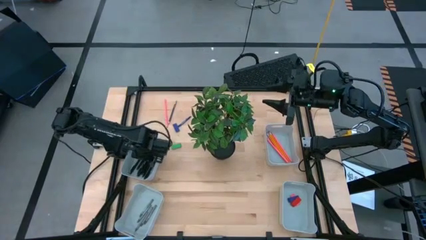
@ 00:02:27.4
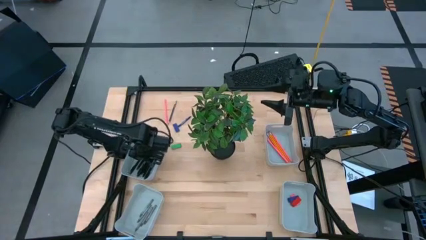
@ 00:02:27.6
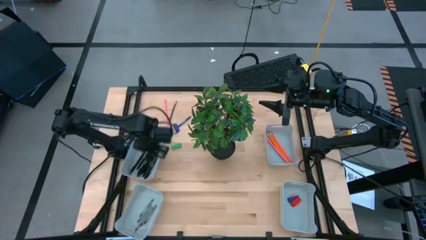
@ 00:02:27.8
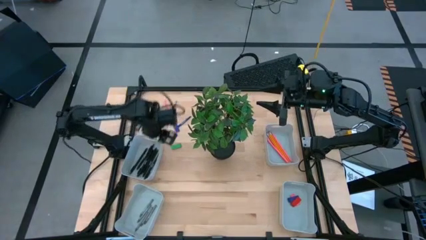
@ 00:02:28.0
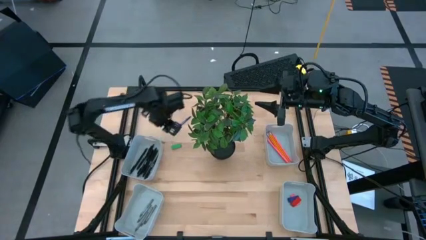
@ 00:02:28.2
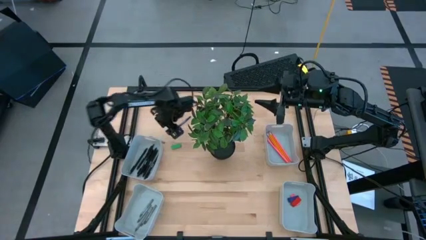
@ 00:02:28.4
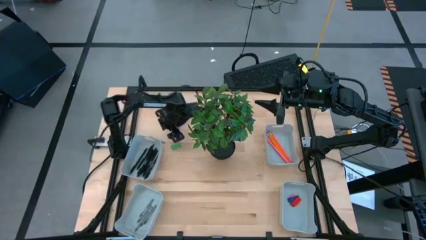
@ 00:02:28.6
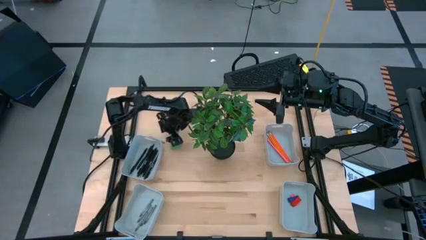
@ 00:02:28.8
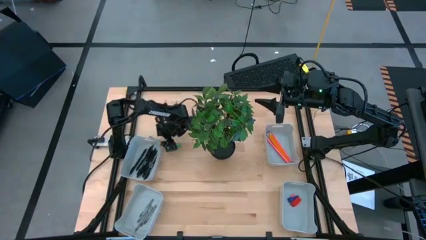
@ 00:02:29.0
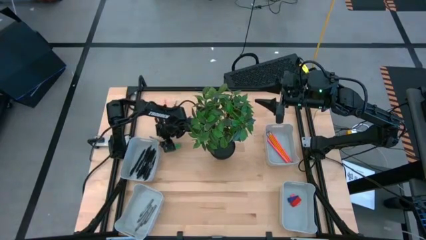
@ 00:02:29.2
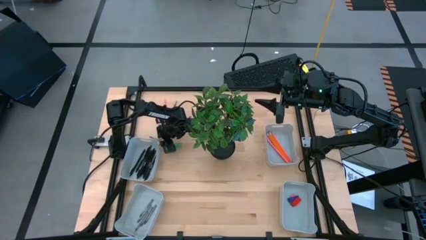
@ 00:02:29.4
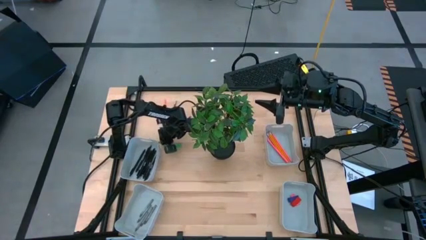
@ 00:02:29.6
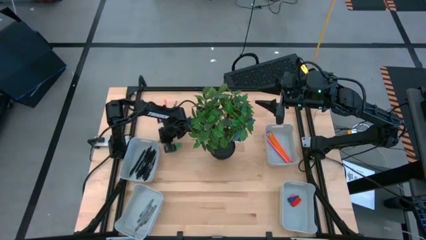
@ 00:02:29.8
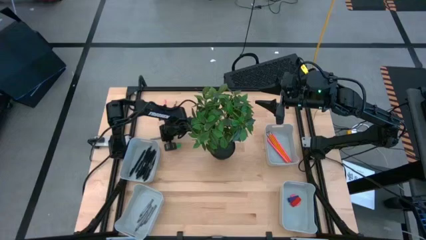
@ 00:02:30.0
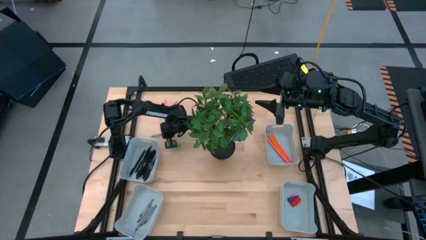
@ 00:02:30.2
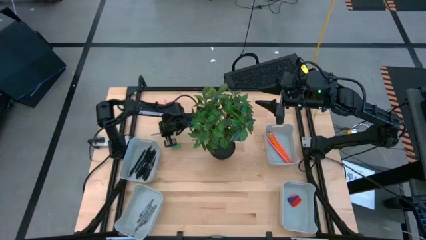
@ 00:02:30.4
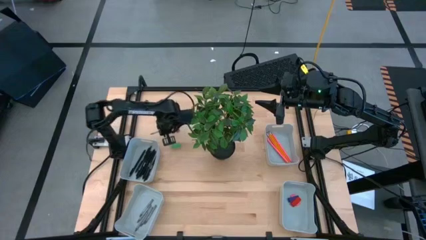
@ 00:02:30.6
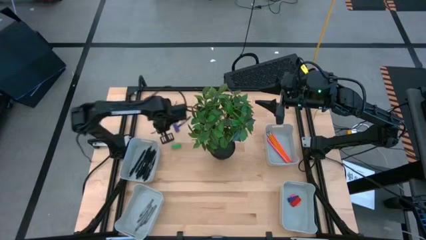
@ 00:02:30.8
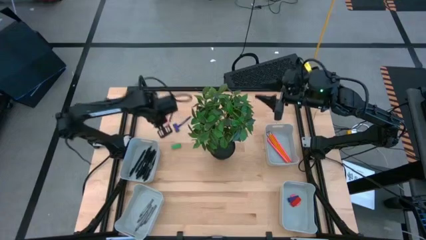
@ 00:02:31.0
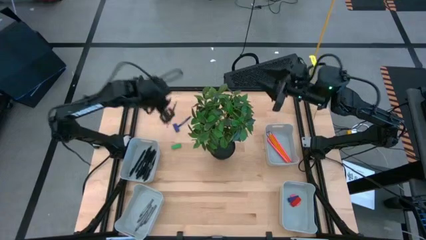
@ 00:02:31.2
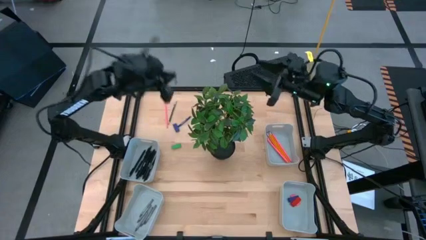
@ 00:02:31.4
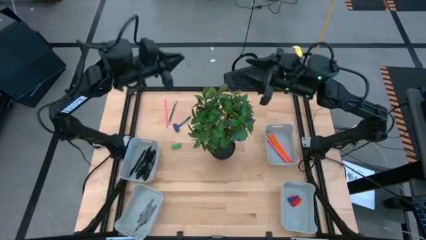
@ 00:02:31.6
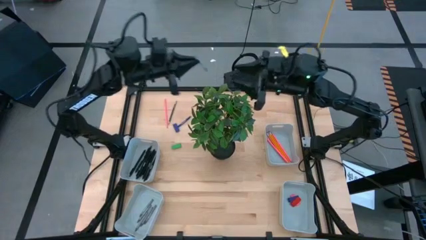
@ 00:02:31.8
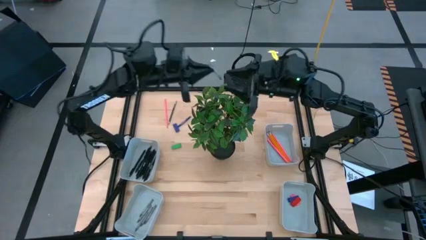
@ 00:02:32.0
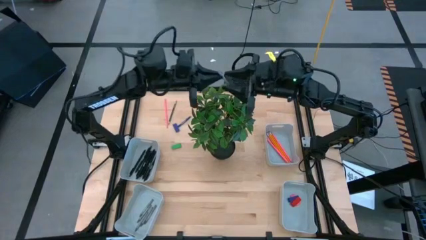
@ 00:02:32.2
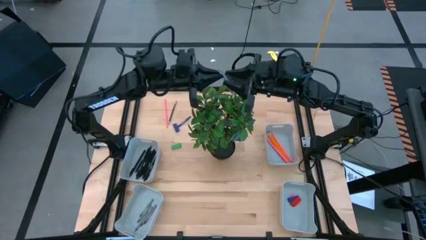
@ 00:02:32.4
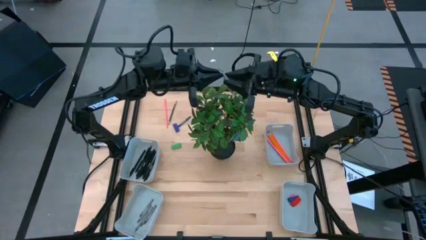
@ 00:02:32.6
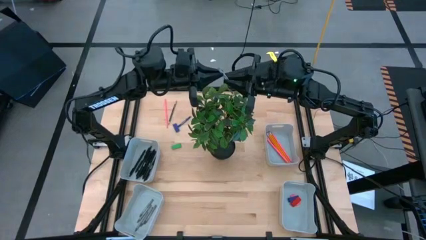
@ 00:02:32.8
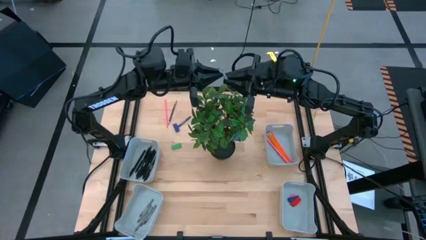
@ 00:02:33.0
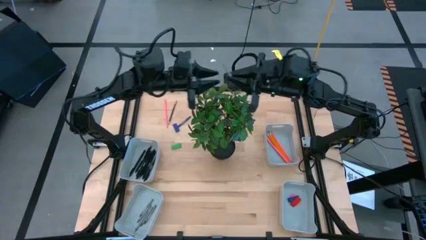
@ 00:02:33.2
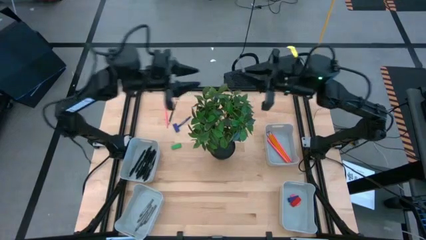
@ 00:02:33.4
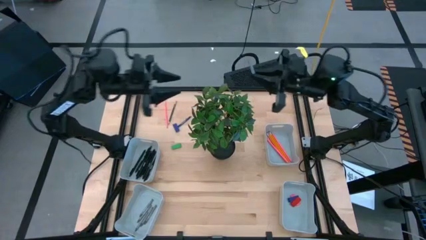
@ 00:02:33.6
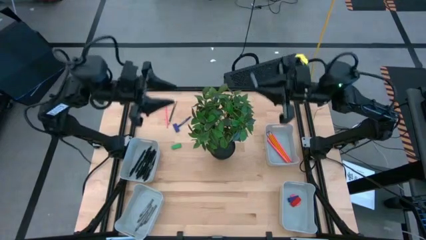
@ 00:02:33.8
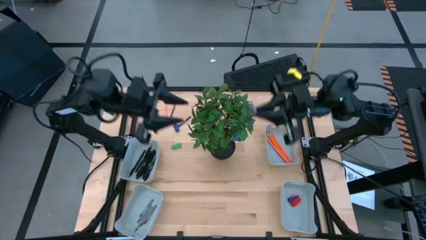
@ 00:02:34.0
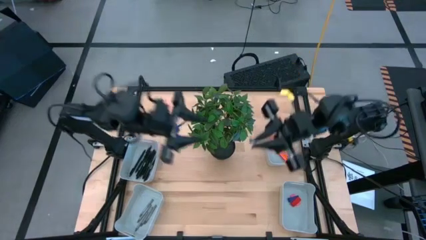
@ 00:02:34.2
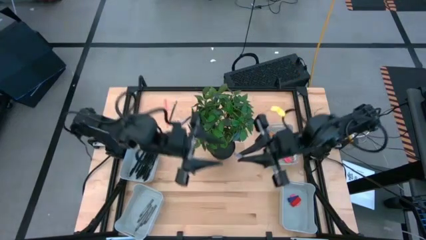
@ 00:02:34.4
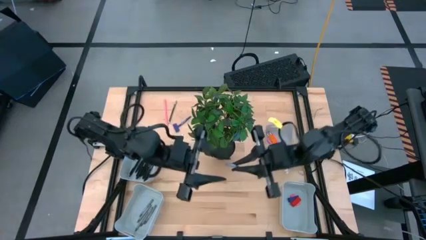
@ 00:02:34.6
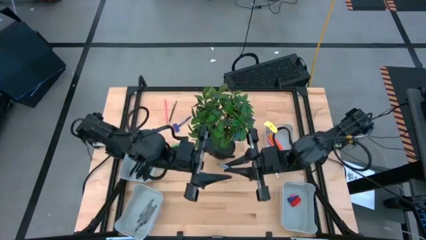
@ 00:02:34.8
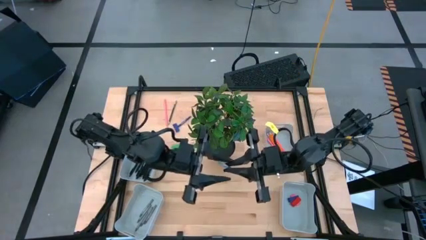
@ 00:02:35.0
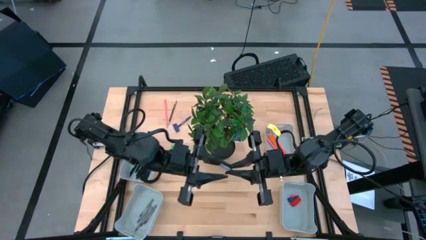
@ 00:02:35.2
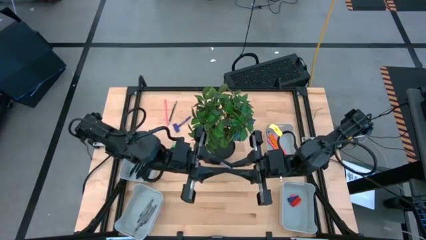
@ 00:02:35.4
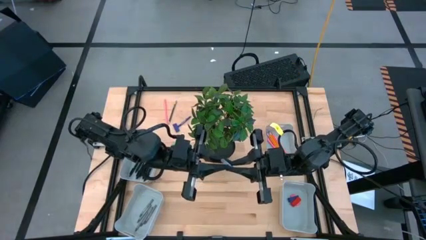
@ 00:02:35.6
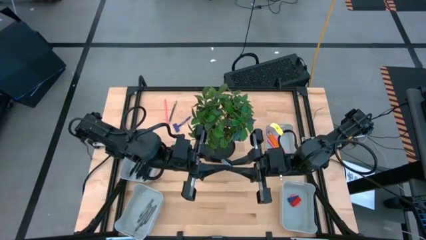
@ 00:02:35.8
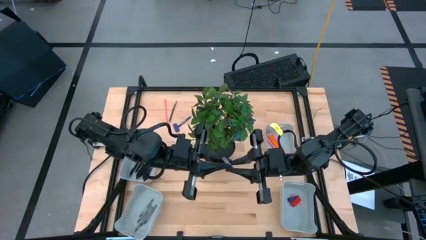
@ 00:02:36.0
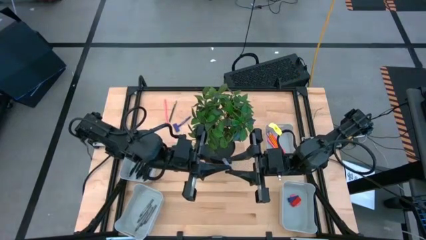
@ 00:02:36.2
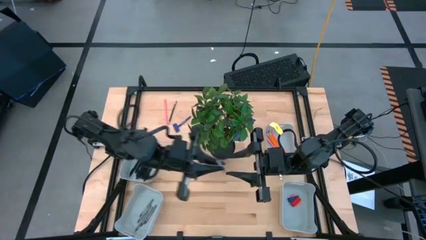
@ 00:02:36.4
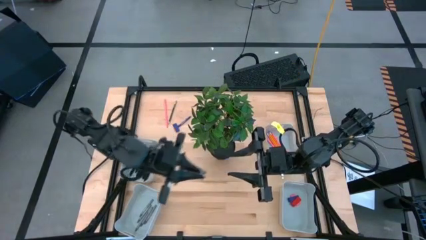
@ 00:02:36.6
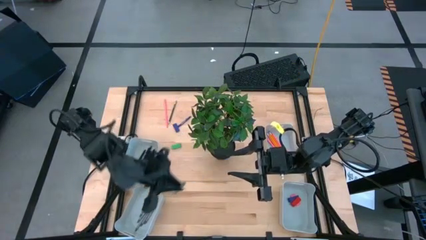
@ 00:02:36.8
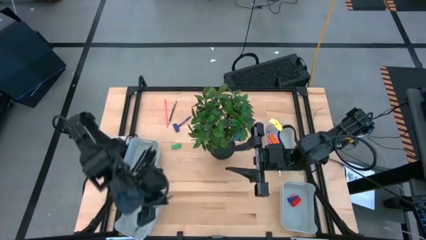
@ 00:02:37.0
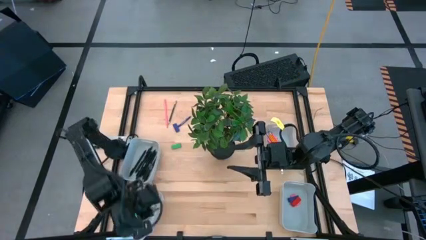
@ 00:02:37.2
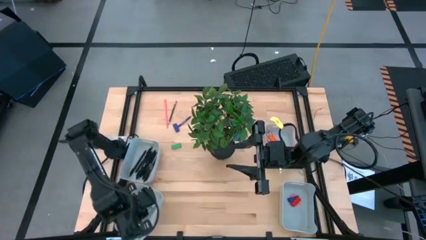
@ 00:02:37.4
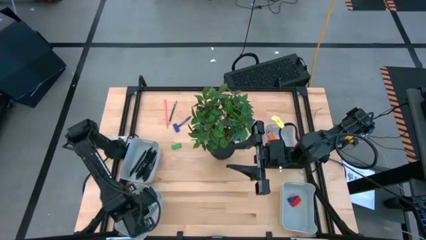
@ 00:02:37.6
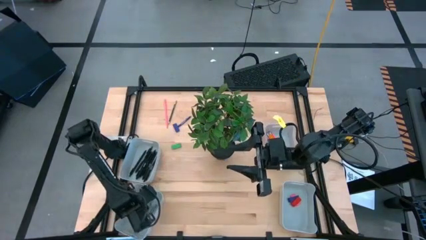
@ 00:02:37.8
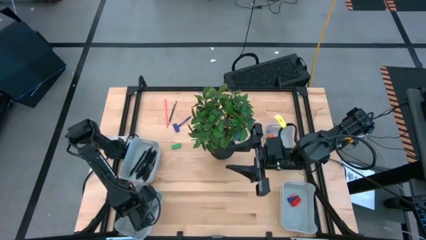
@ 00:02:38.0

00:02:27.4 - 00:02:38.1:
Task: Sort crayons/erasers/pens/pencils in bins
Put the gray crayon into the bottom left gray bin

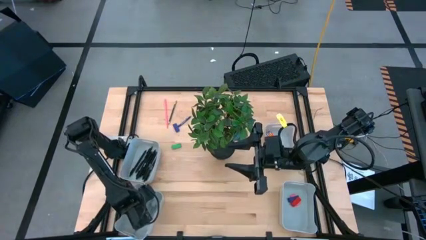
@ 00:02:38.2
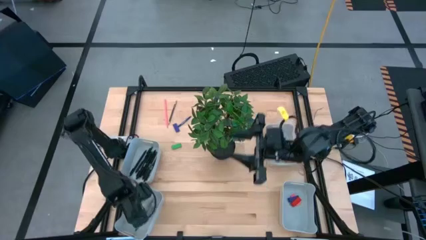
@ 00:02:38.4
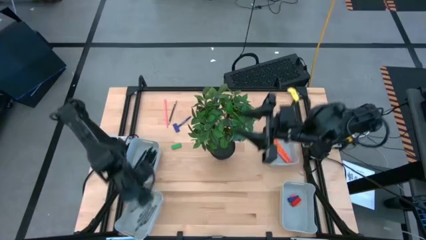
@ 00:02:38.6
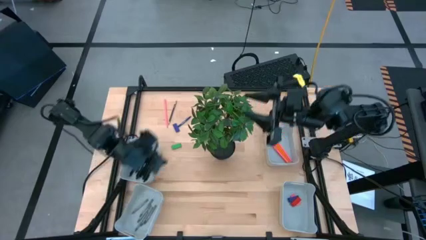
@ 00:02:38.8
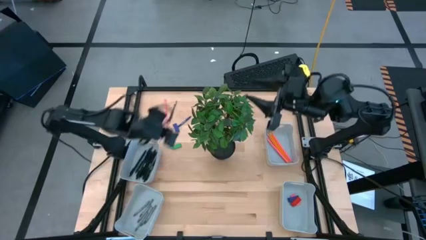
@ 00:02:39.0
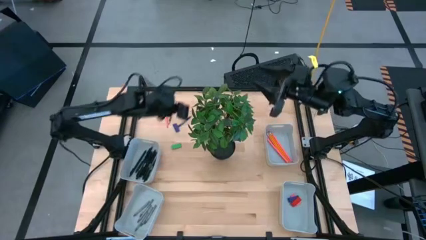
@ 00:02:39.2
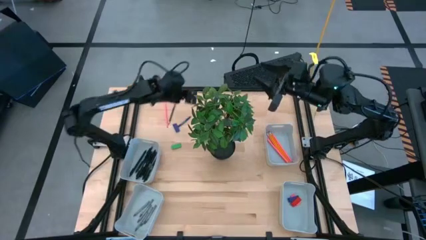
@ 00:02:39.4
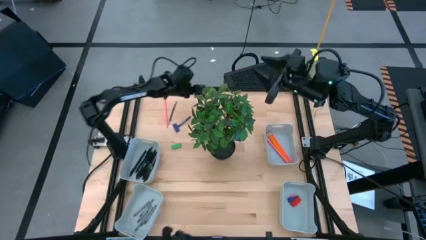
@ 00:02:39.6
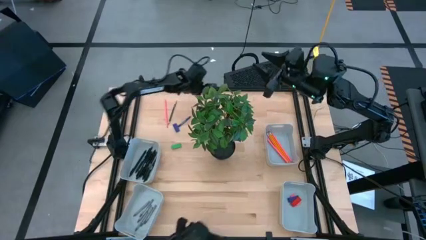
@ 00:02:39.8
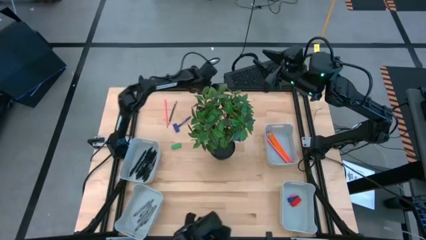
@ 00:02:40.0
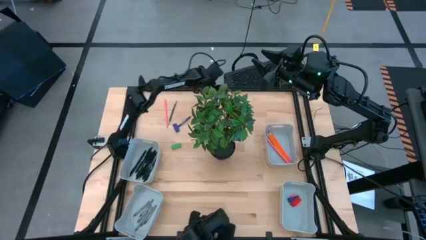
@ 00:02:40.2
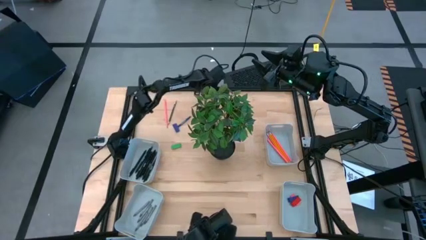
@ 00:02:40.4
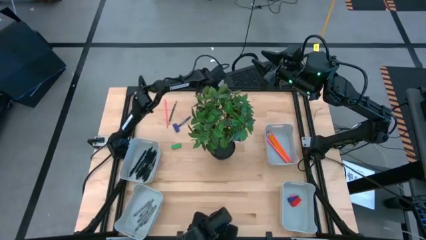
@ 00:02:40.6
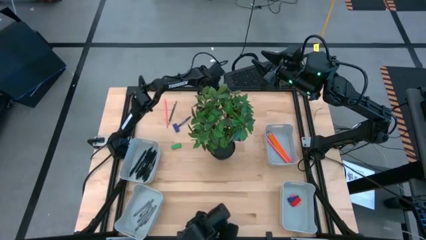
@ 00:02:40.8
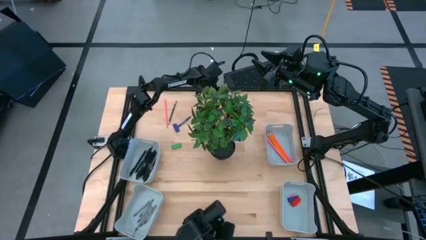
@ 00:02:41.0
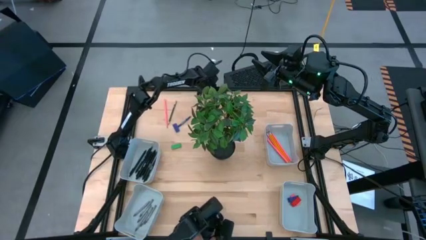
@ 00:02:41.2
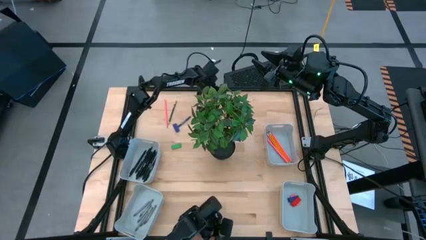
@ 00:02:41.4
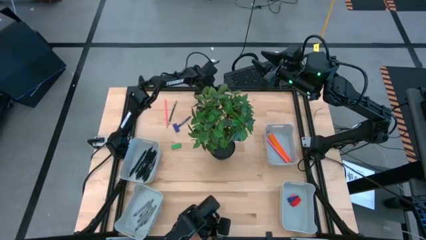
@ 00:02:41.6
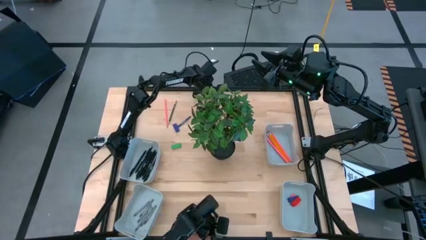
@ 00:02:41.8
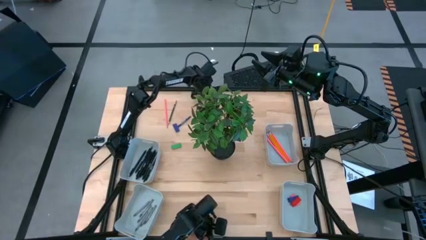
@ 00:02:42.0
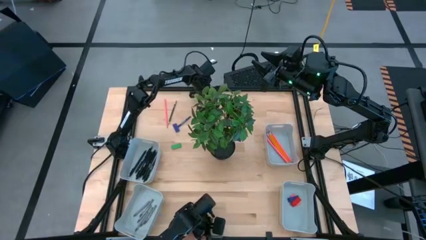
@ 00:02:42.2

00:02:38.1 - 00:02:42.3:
Adjust the gray crayon

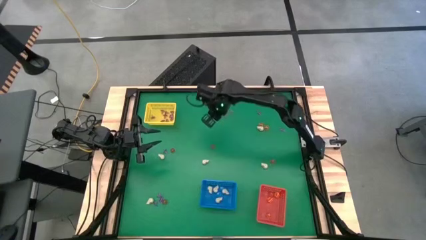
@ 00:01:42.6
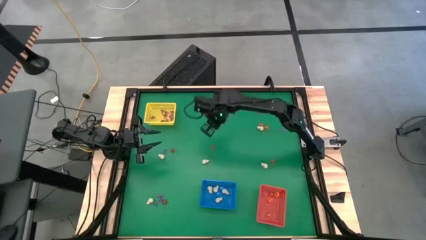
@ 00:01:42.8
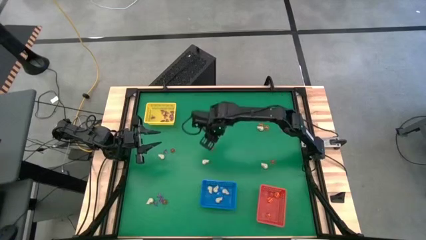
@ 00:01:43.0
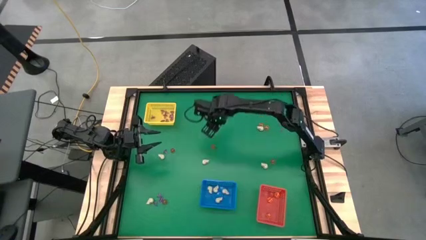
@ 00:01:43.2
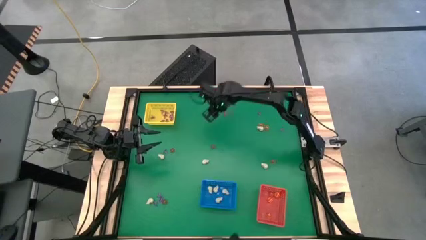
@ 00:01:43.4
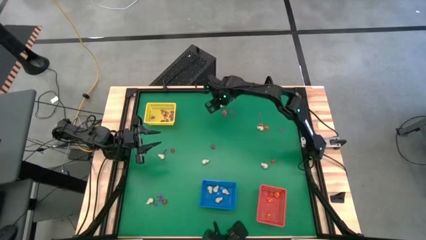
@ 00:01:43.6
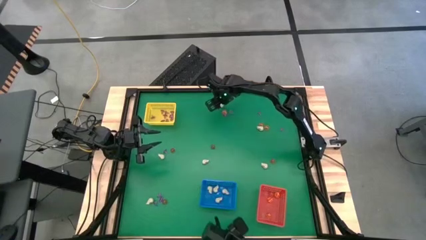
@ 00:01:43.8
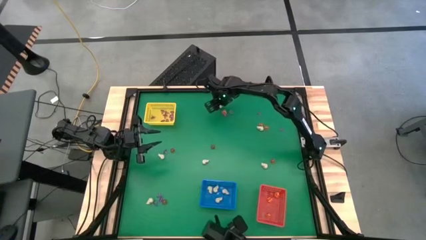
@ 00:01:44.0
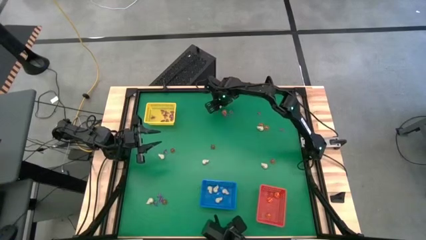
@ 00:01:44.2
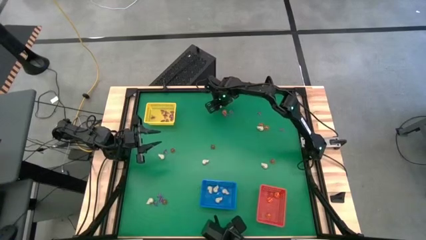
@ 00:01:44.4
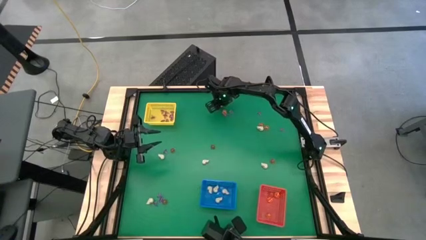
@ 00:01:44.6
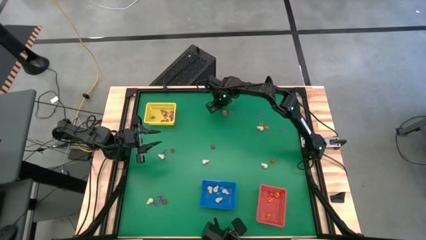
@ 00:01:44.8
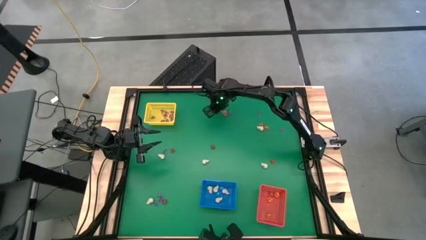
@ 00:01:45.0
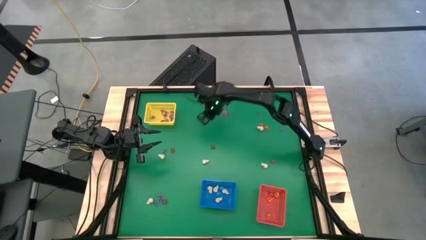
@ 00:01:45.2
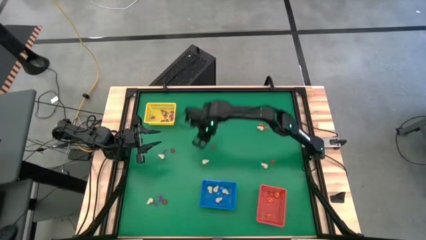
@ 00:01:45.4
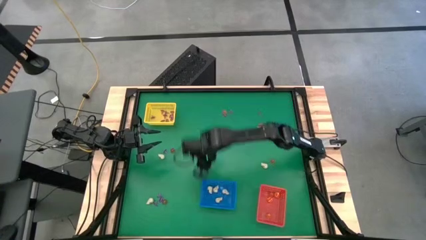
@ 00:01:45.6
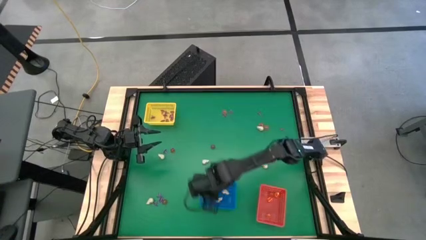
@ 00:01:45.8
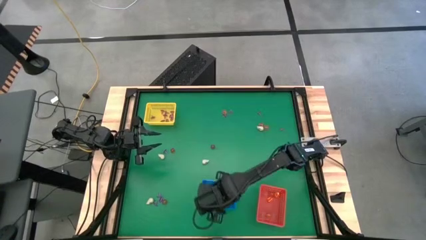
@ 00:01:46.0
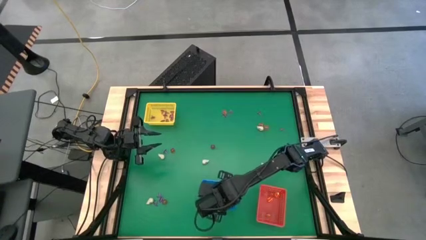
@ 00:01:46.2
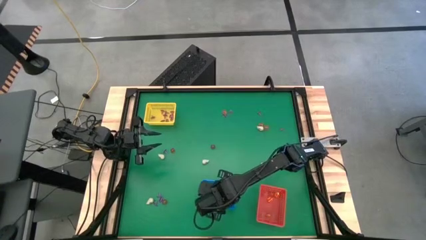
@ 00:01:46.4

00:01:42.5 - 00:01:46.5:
Task: Sort Halloween decoration
Put the white skull toy into the blue basket
